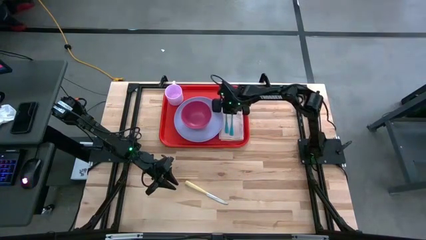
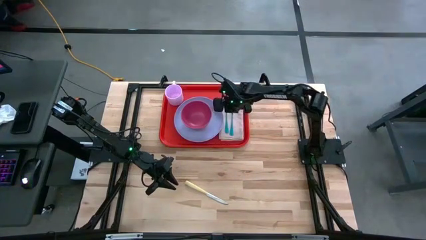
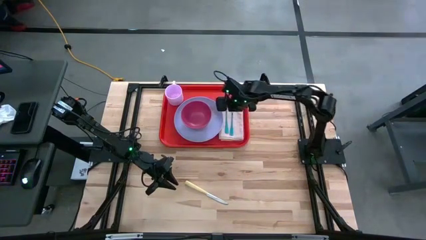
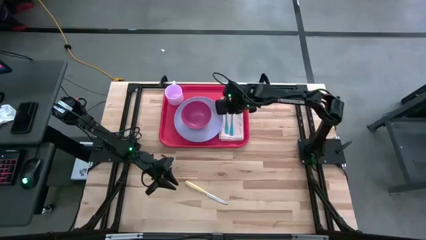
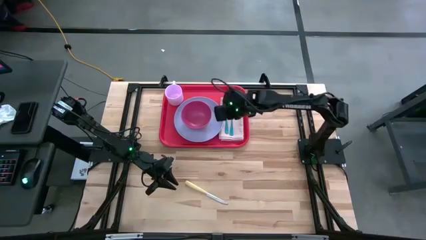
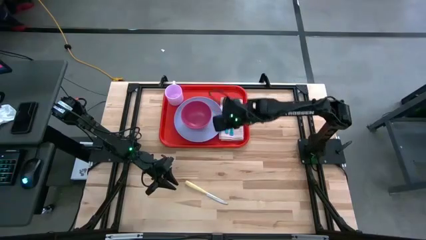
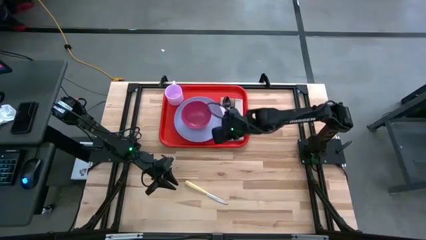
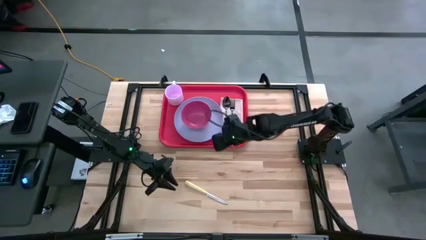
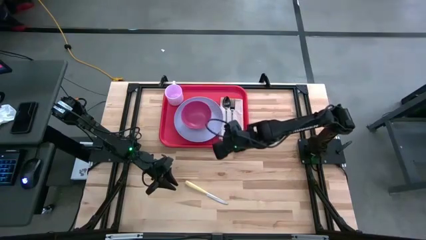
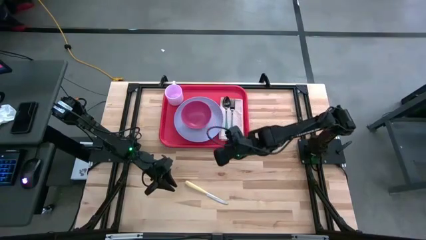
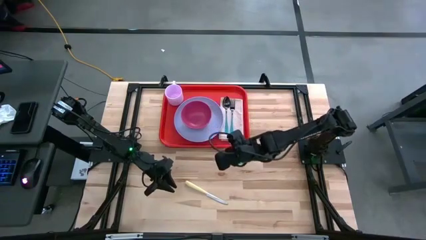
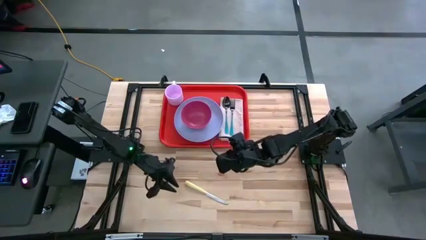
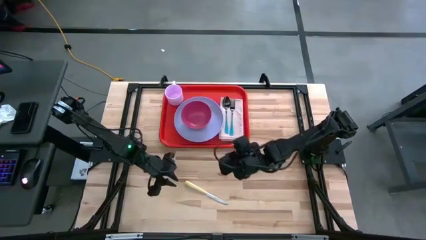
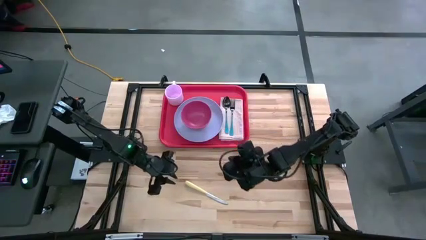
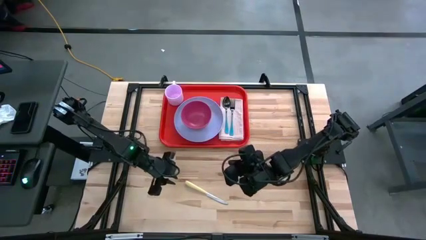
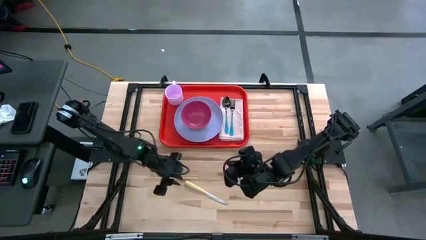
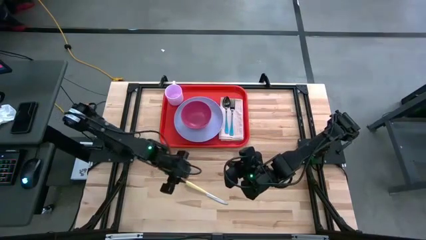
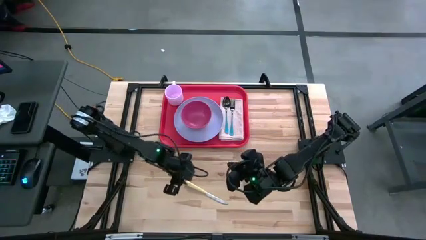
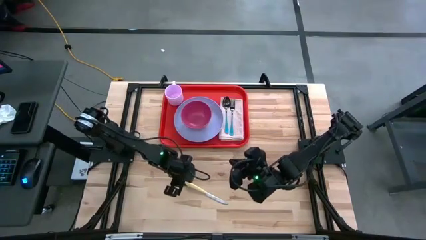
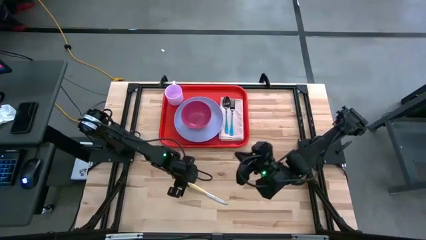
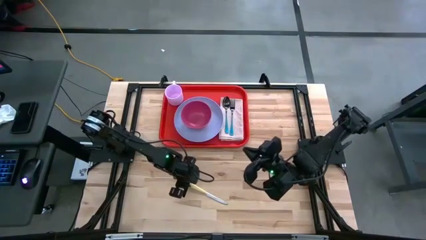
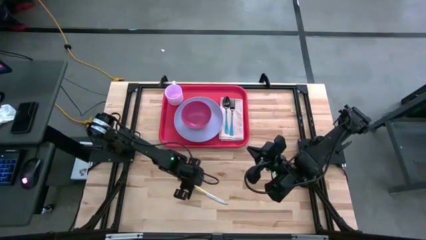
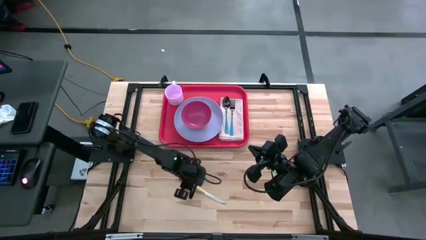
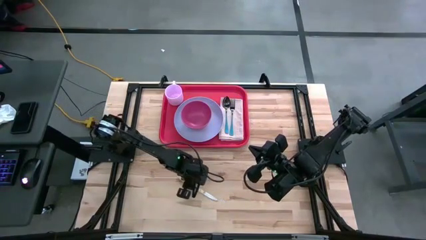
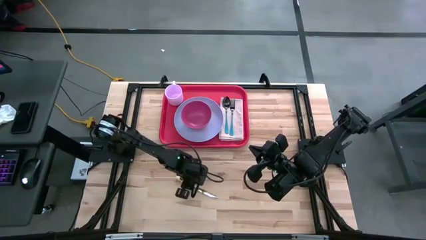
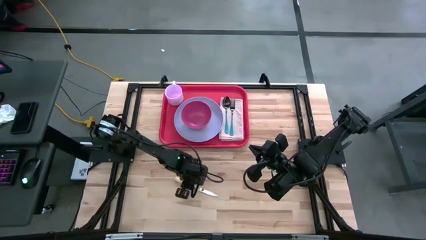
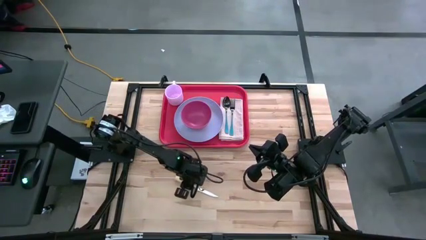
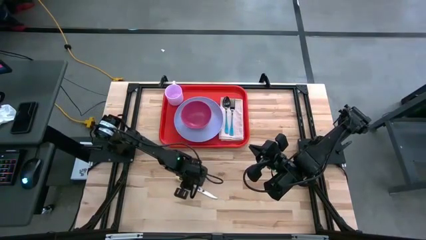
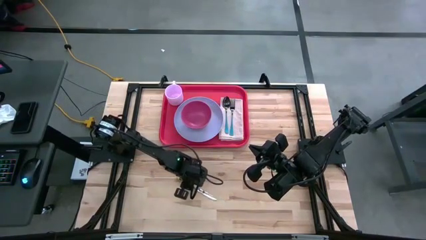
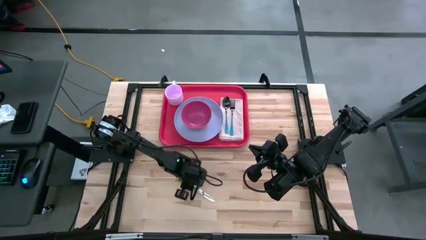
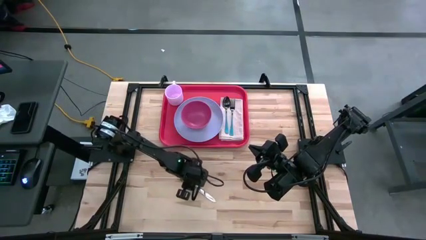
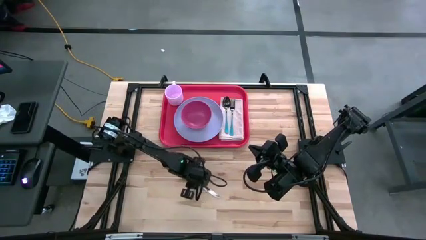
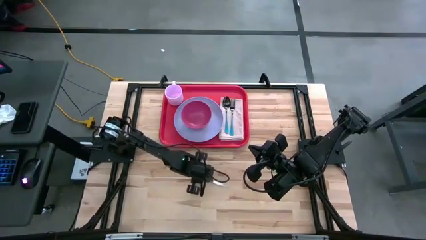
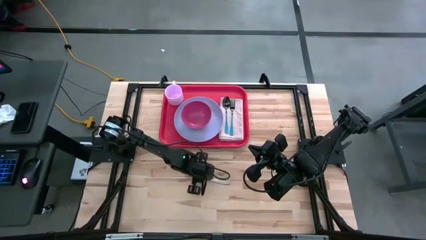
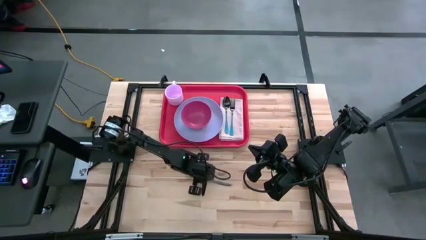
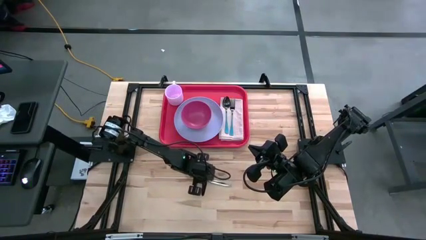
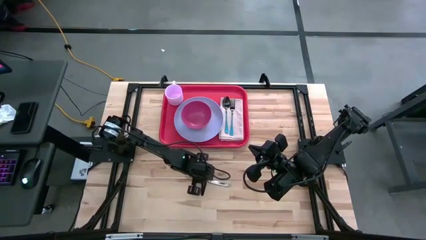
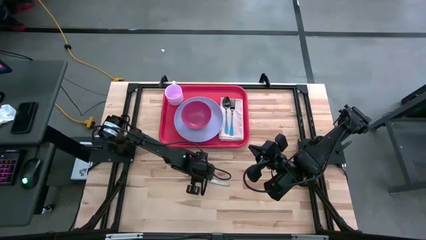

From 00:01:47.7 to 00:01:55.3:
Task: Set up tray
Put the yellow knife on the brown napkin
